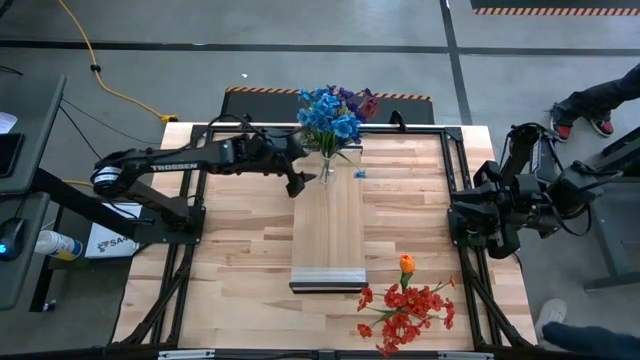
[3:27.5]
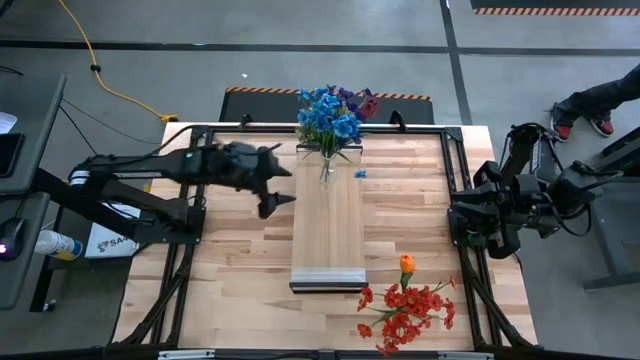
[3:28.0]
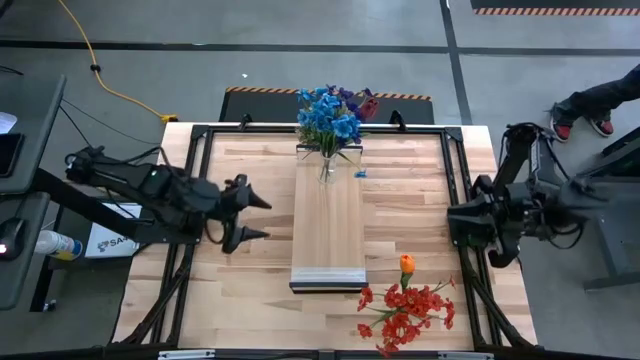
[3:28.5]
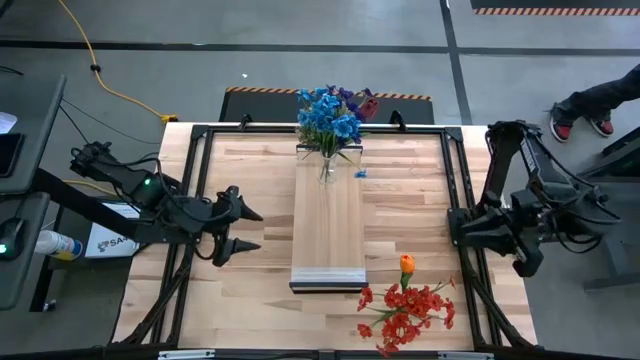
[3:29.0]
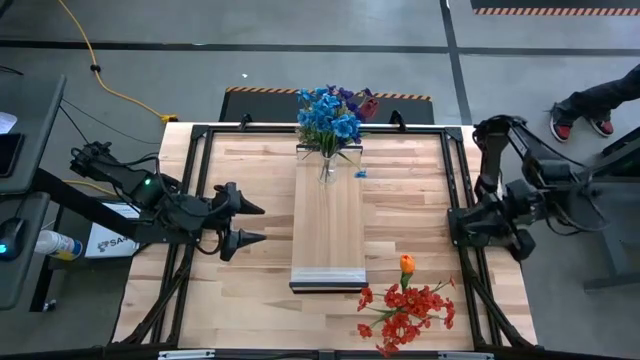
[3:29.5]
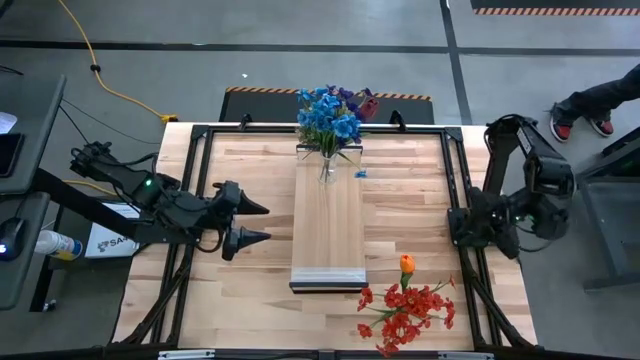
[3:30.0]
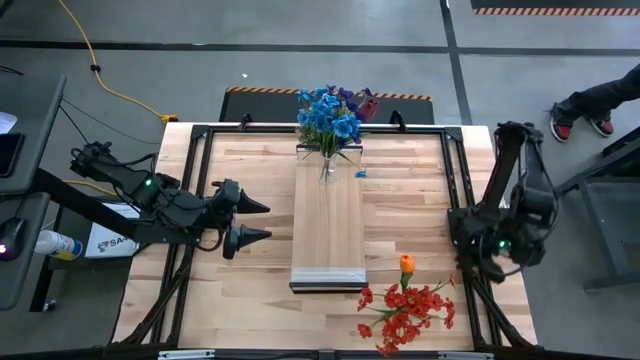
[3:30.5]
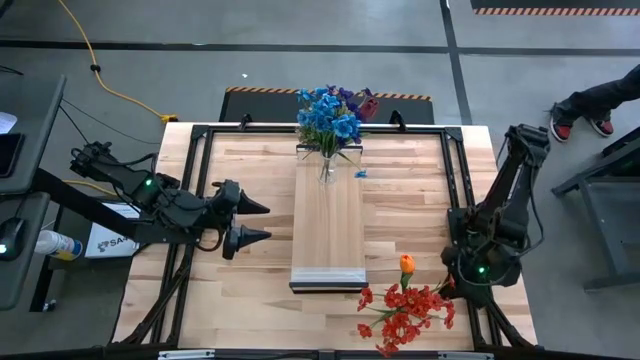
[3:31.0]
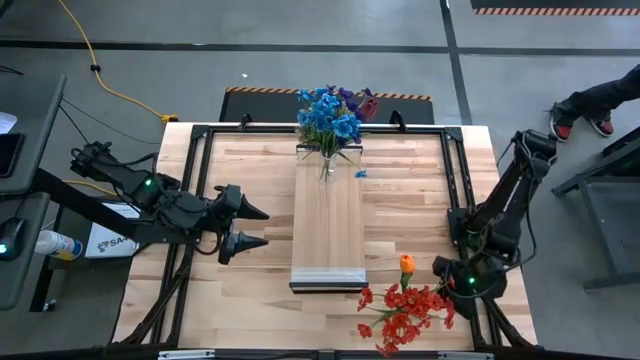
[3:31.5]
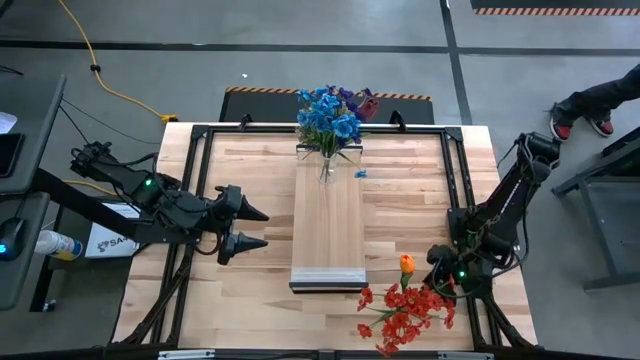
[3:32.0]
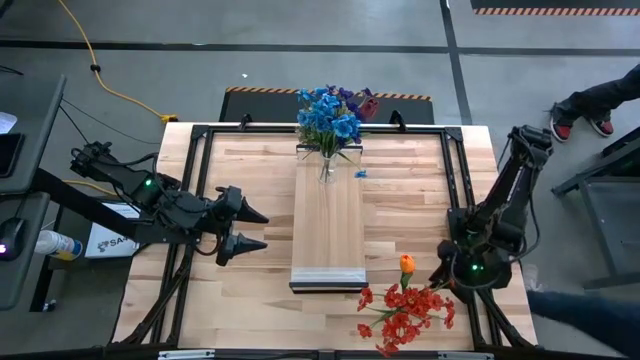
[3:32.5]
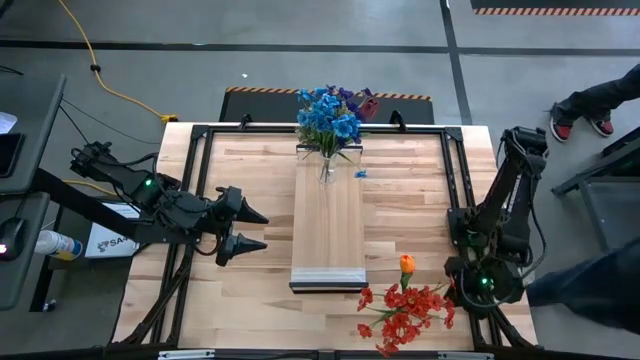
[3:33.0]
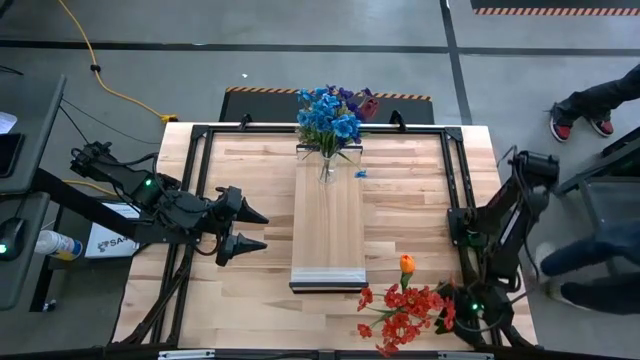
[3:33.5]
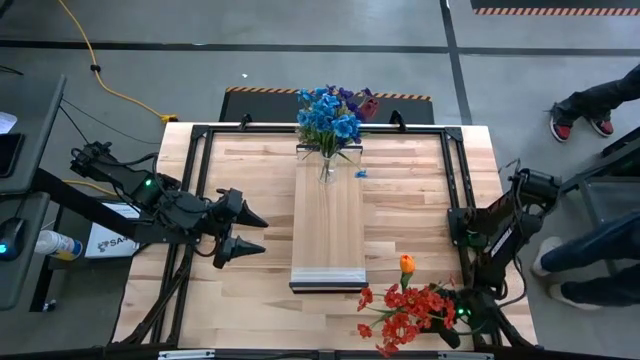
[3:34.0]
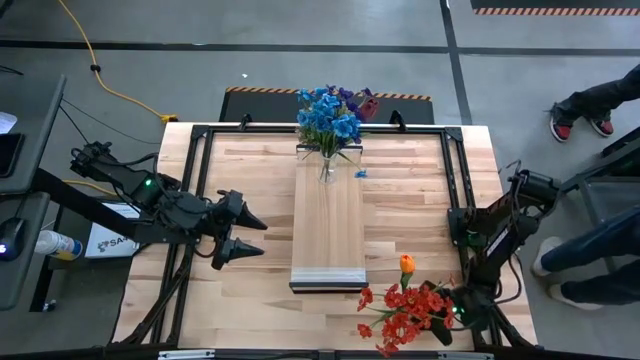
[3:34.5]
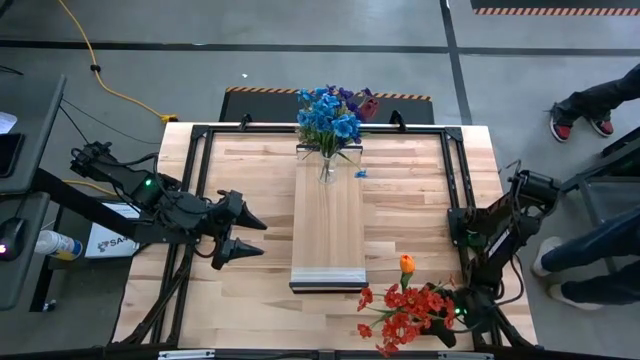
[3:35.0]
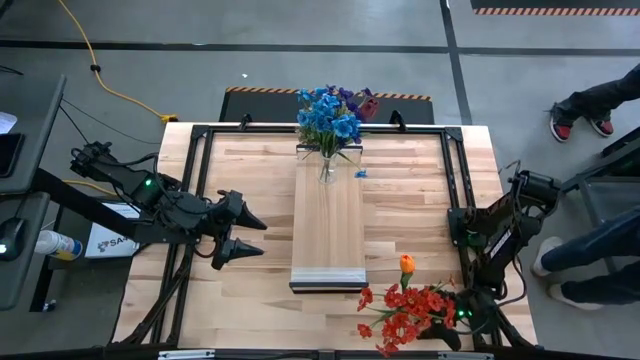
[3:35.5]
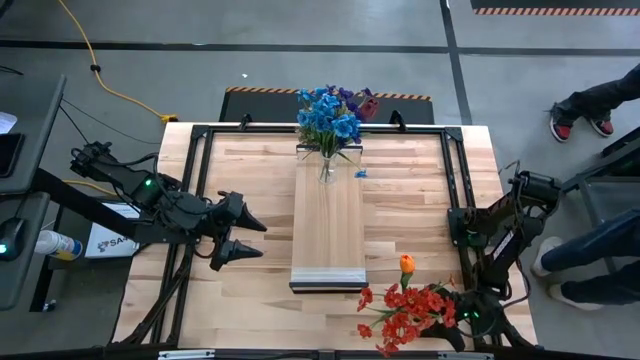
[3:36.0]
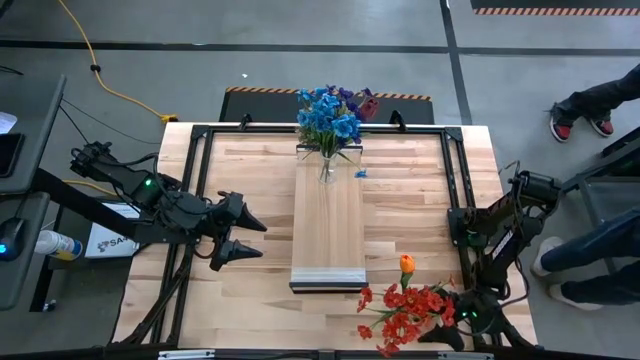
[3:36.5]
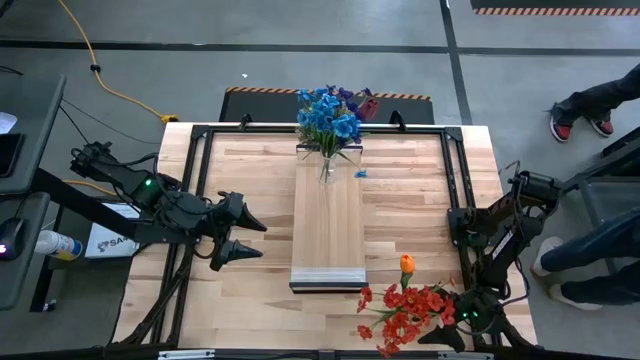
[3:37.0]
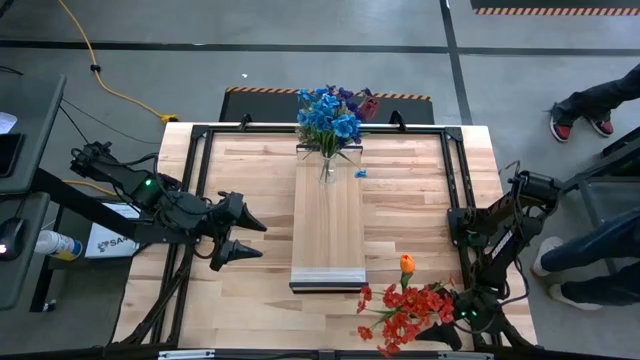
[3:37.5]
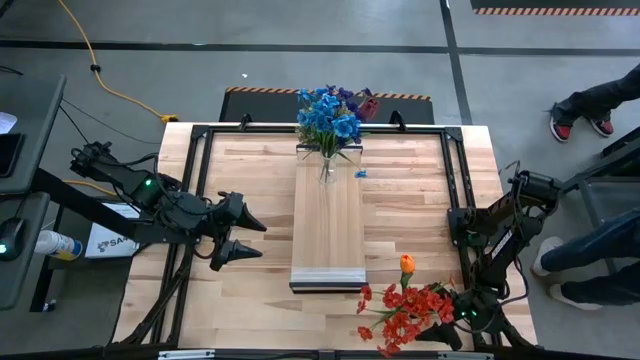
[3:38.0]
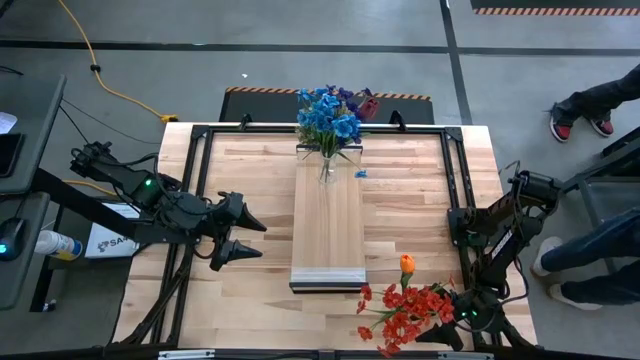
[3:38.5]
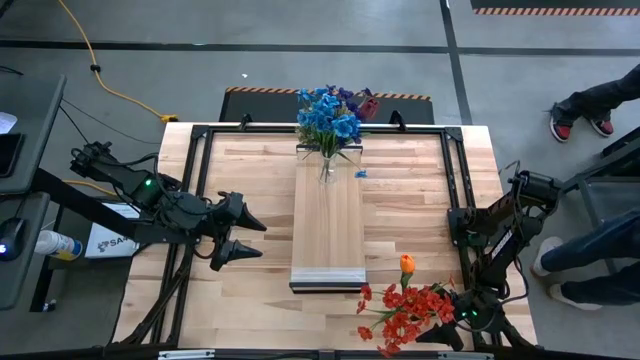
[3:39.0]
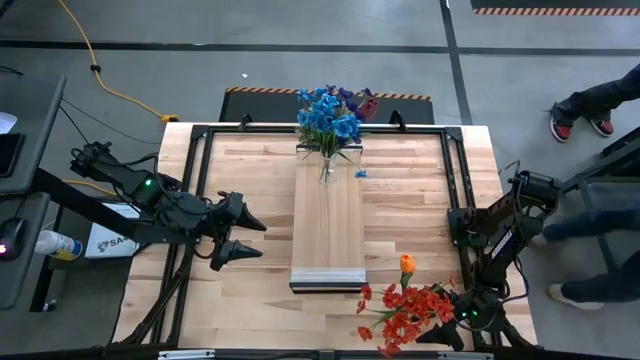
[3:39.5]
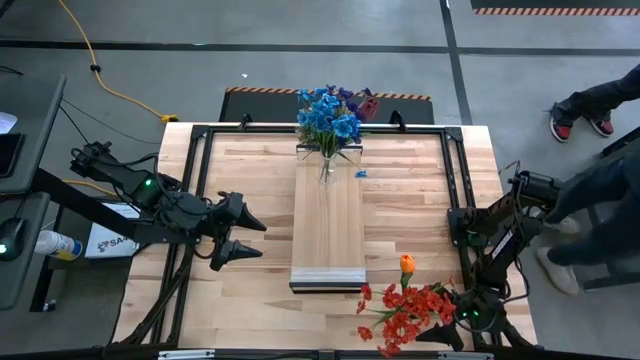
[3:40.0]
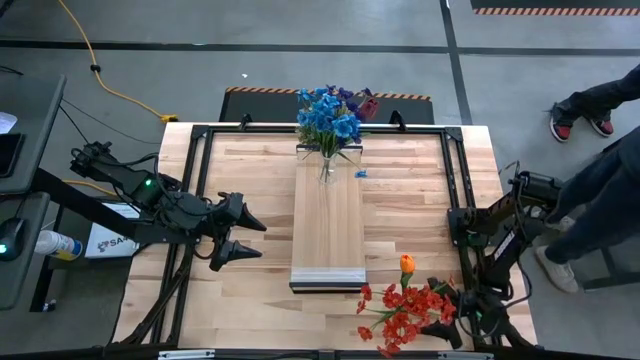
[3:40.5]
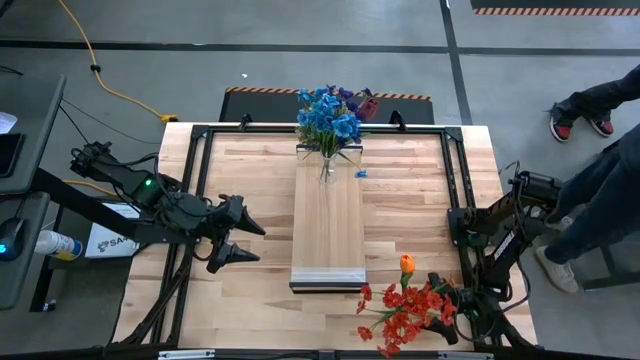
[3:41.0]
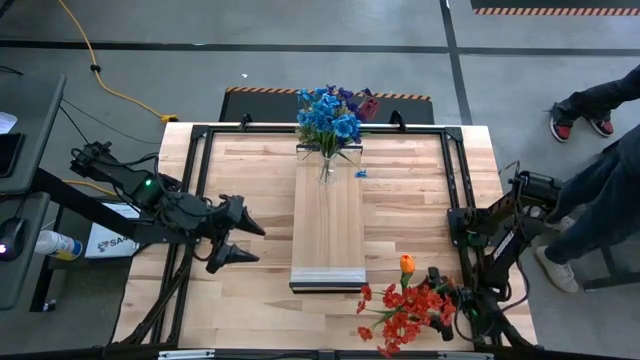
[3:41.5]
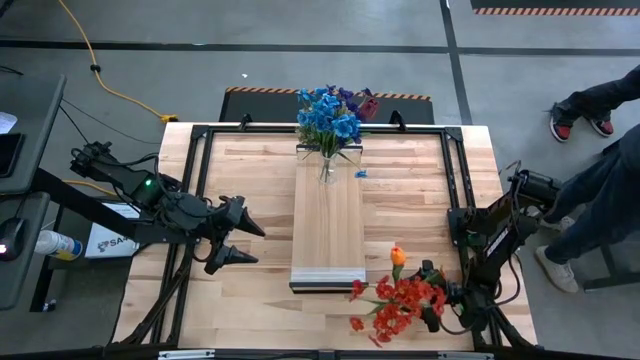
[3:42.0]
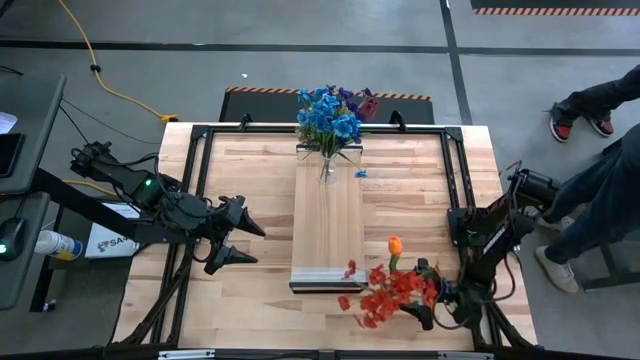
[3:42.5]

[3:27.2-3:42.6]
Task: Pick and place flowers into a vace then onto a shelf
Put the transparent vase on the shelf

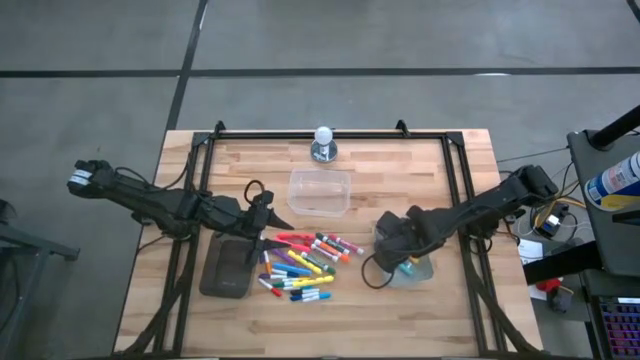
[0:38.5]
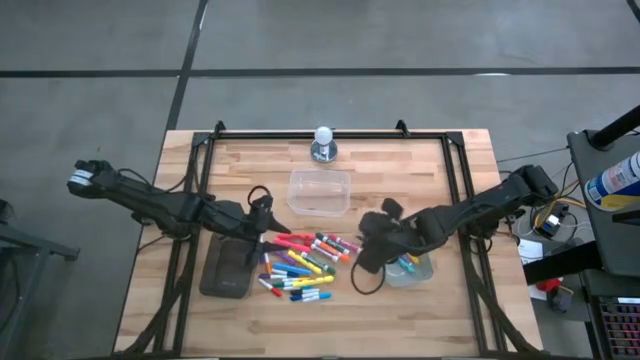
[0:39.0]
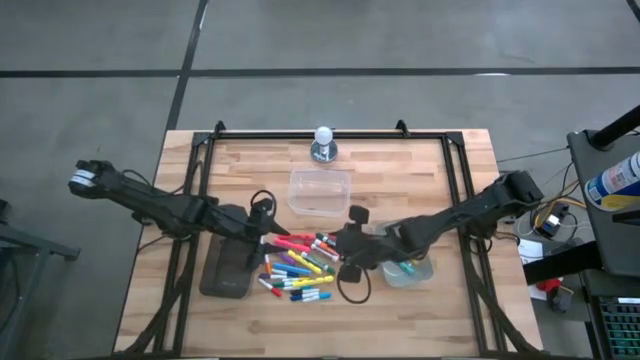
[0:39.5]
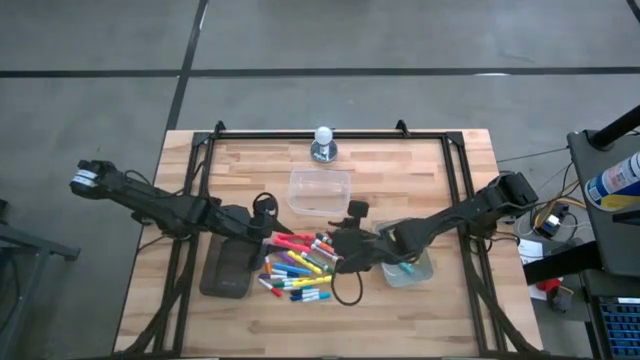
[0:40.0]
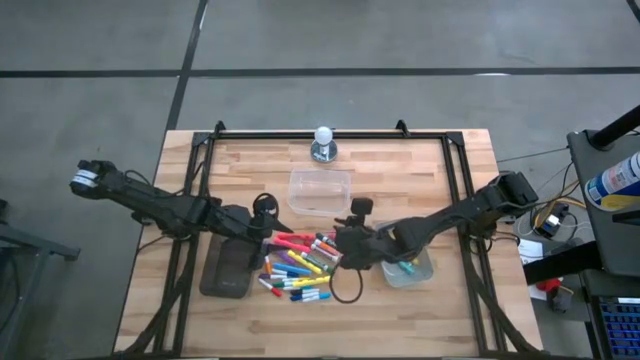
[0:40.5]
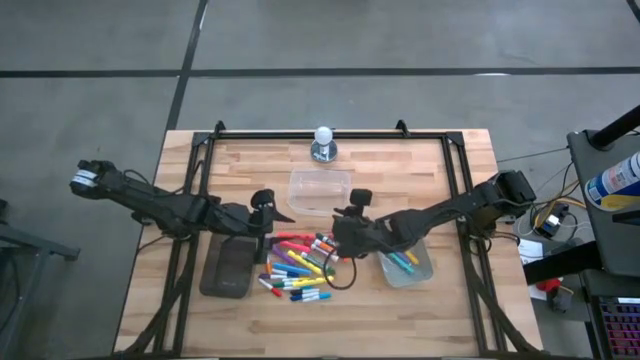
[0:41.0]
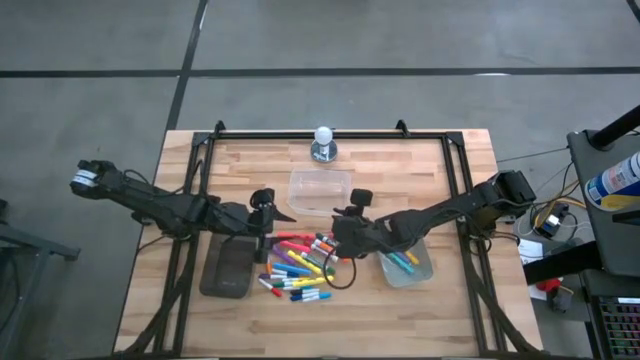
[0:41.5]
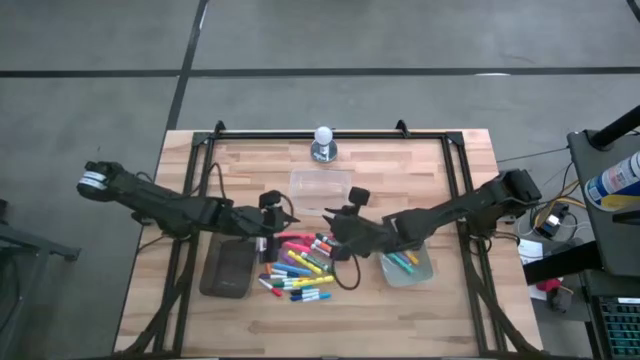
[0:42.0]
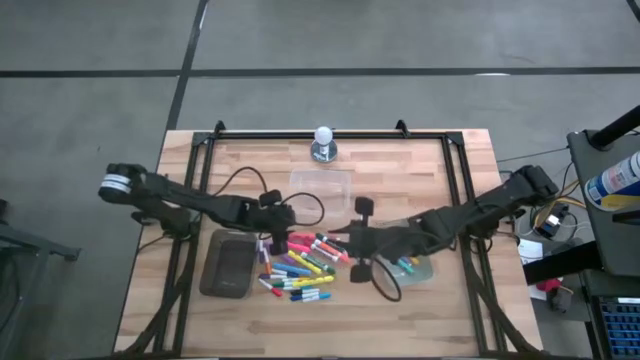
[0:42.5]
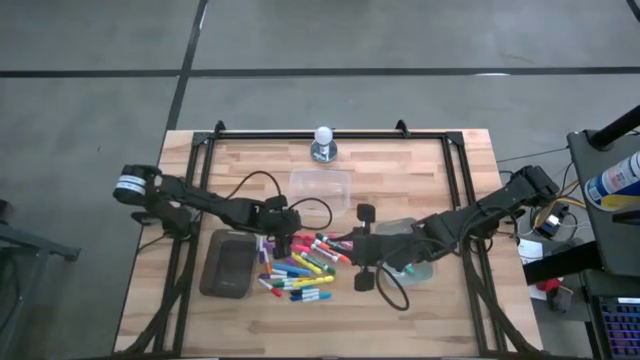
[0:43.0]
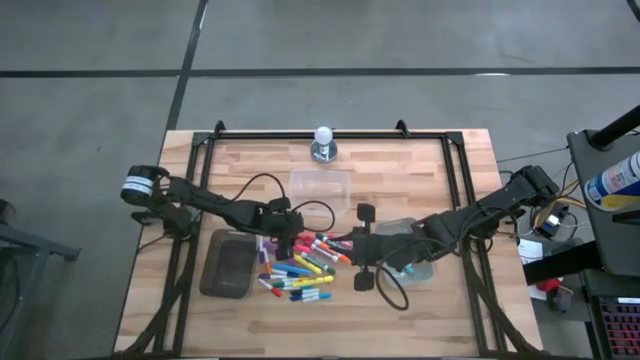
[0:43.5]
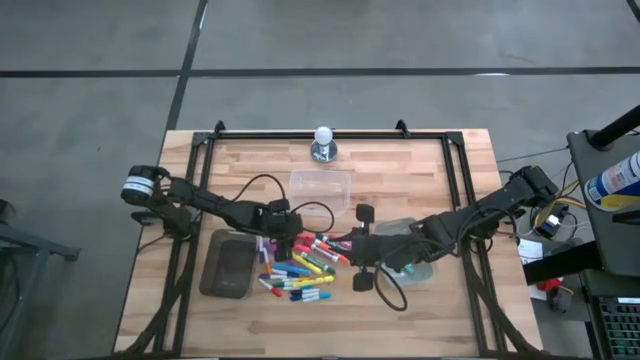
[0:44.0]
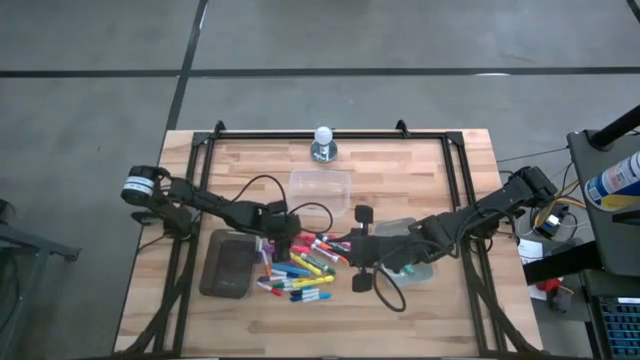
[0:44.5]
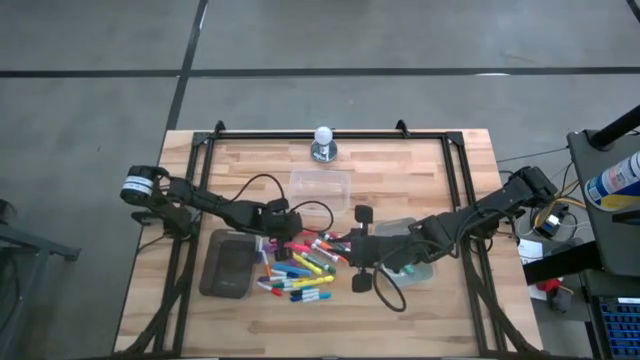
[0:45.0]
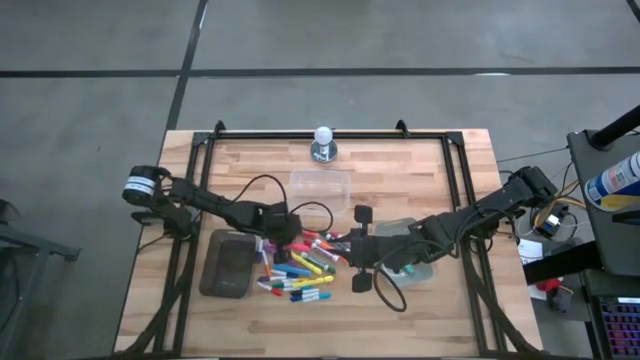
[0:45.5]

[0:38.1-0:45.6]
Task: Pick & Place Markers
Put the red highlighter into the gray bin
